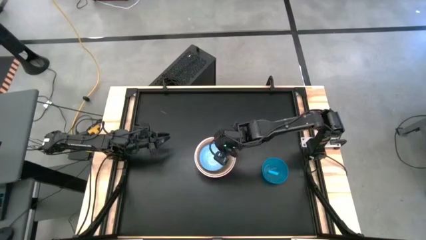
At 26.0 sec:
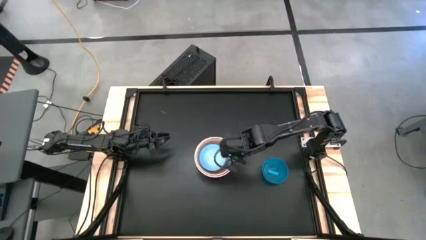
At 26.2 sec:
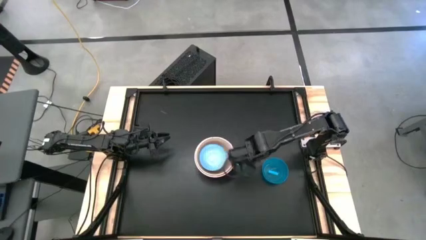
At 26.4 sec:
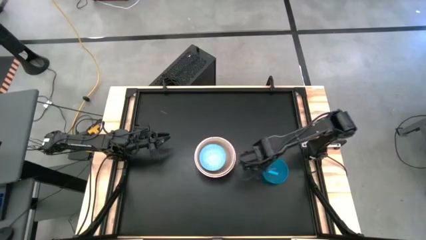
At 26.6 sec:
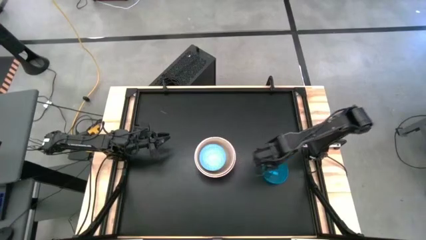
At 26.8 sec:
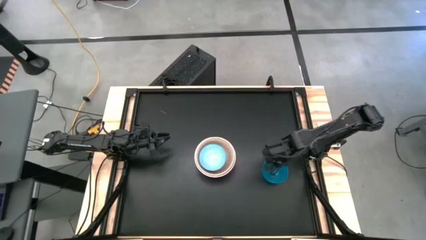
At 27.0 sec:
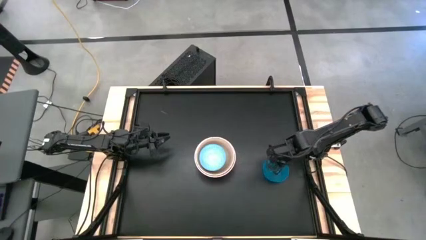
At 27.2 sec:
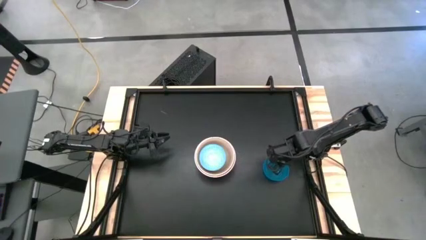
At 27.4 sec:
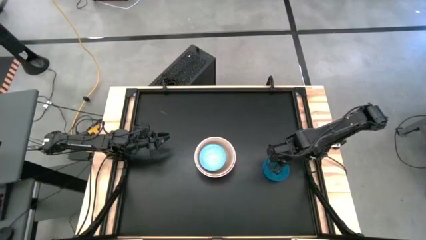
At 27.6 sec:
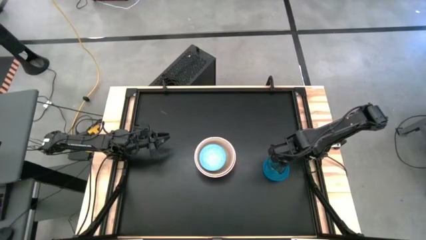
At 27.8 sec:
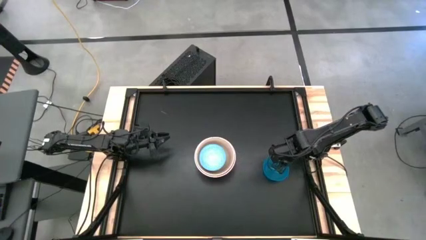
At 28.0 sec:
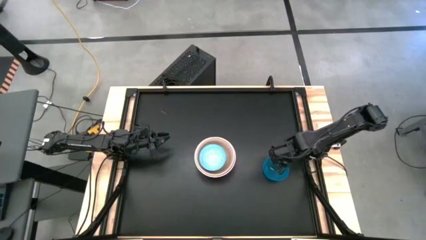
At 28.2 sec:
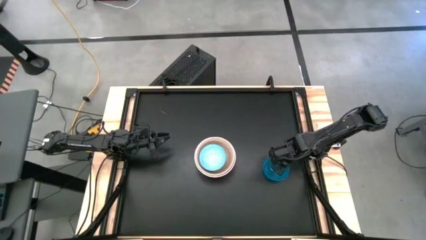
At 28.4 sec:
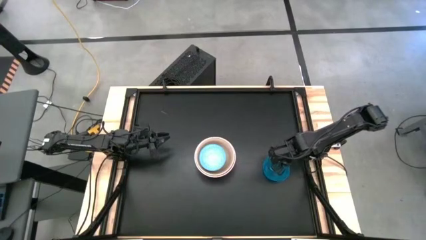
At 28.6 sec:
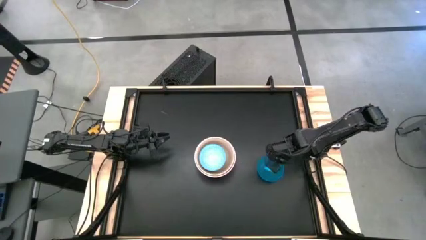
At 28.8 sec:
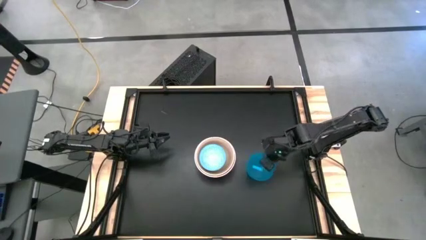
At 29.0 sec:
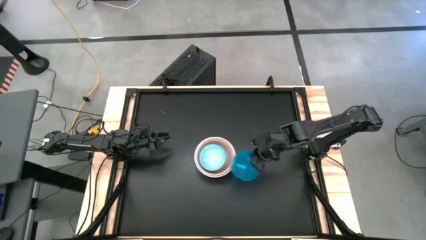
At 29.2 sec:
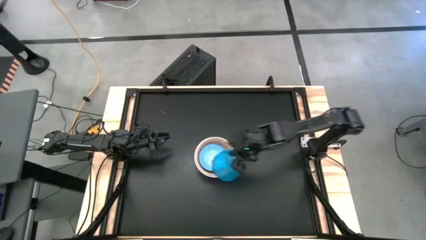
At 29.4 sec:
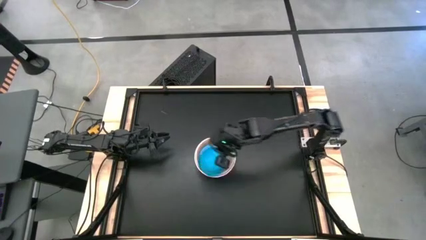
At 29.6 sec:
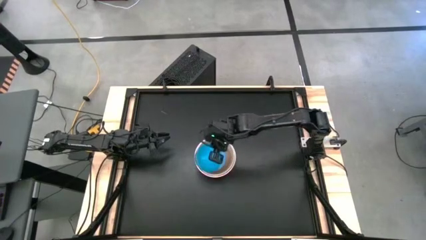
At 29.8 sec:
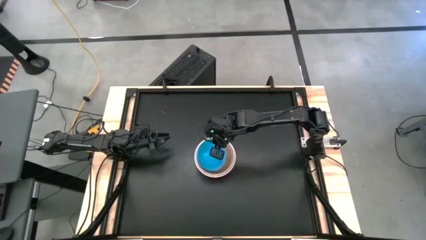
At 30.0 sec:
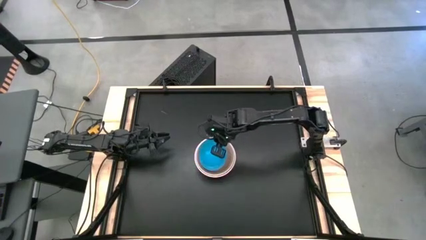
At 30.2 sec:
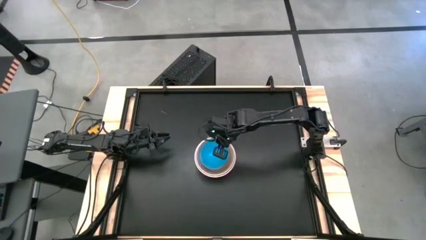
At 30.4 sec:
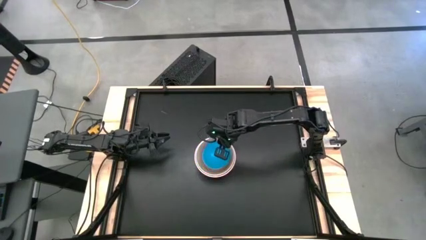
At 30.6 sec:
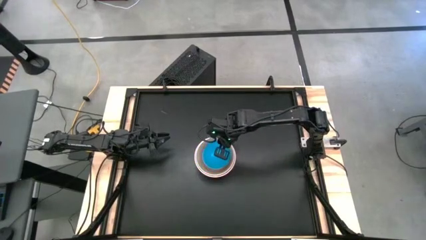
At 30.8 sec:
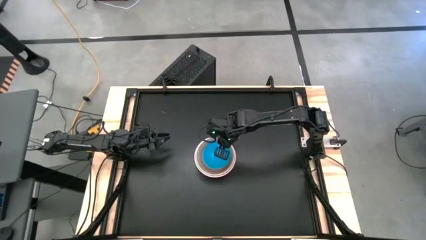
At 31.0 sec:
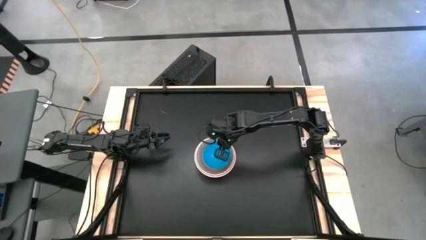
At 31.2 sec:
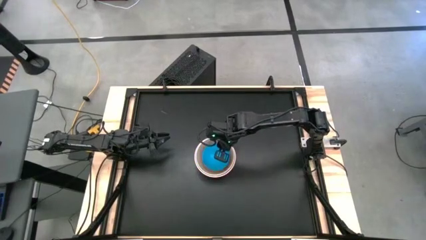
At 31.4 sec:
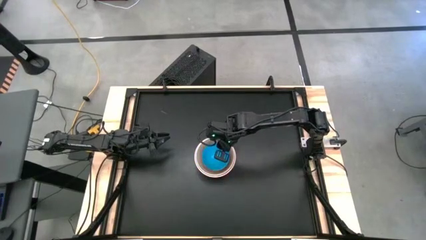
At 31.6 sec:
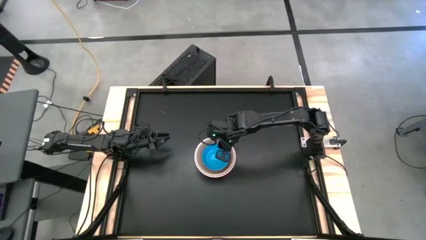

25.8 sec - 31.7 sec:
Stack the transparent blue bowl on top of the blue bowl

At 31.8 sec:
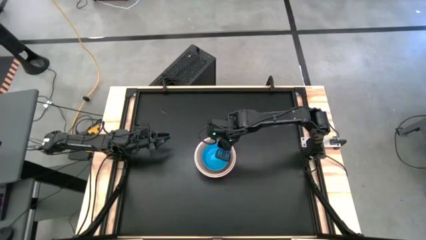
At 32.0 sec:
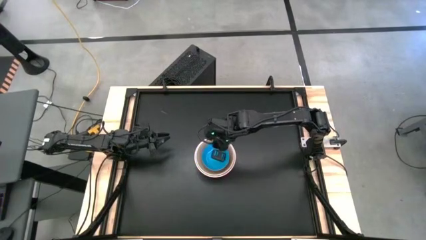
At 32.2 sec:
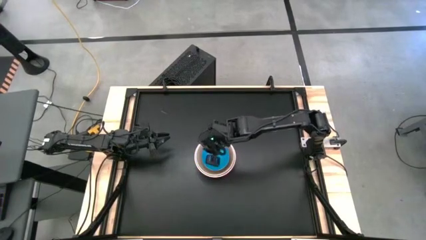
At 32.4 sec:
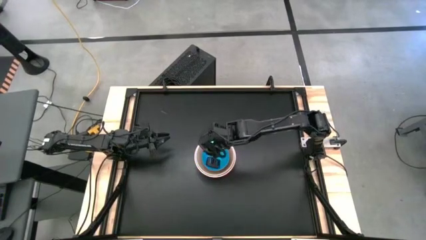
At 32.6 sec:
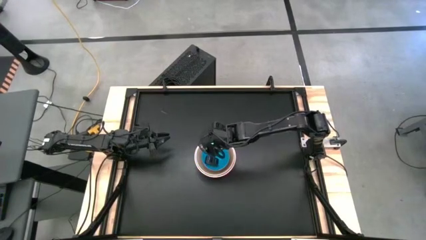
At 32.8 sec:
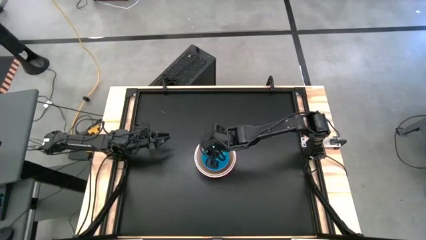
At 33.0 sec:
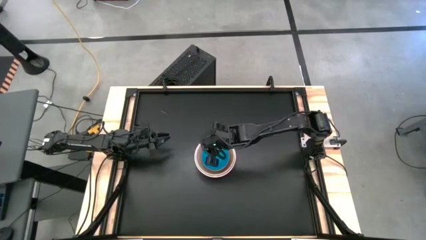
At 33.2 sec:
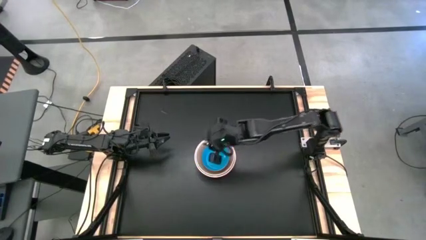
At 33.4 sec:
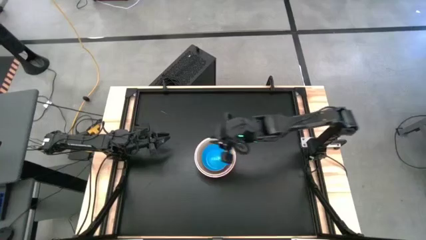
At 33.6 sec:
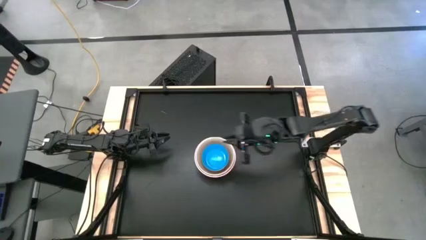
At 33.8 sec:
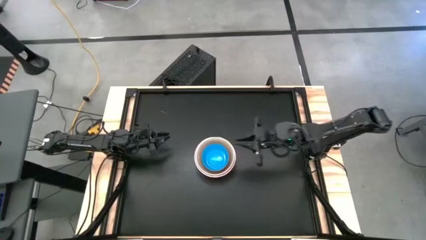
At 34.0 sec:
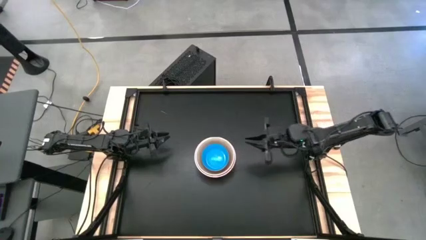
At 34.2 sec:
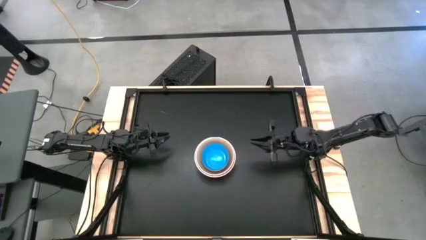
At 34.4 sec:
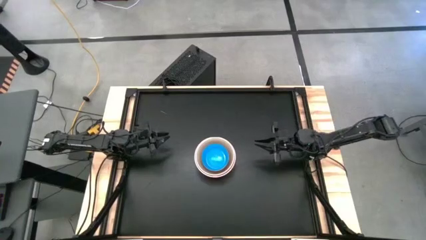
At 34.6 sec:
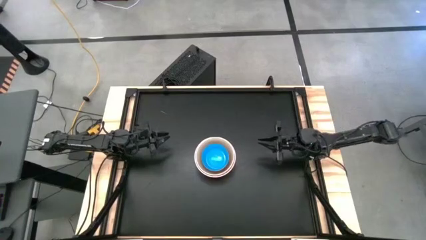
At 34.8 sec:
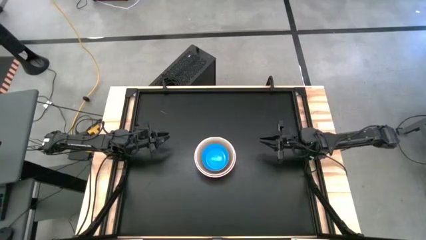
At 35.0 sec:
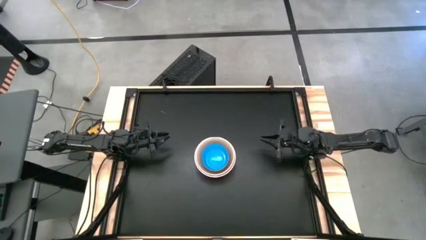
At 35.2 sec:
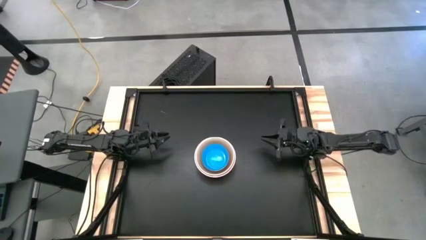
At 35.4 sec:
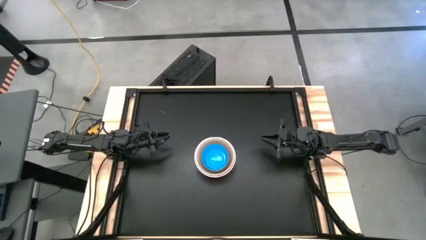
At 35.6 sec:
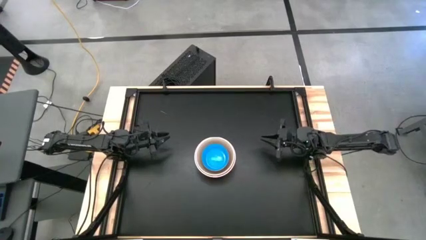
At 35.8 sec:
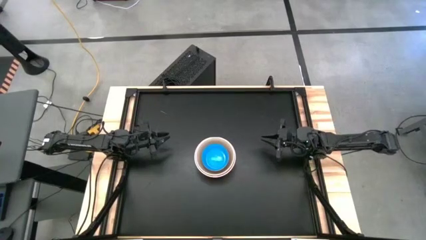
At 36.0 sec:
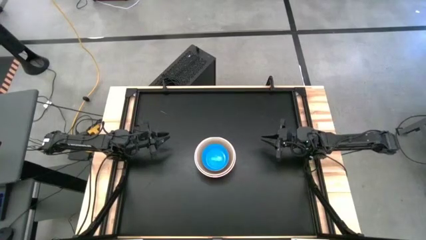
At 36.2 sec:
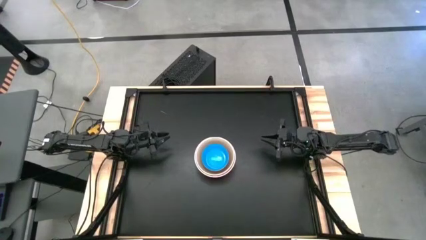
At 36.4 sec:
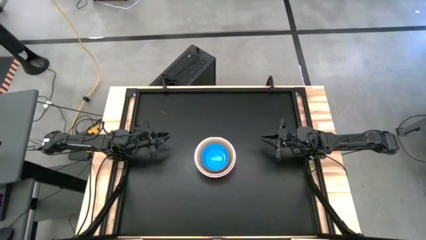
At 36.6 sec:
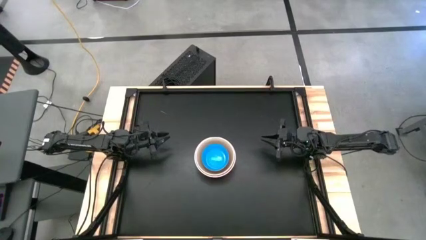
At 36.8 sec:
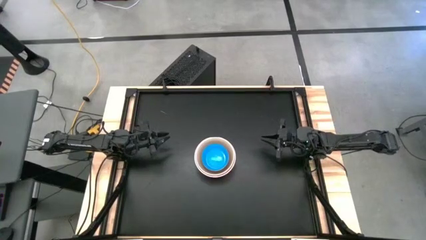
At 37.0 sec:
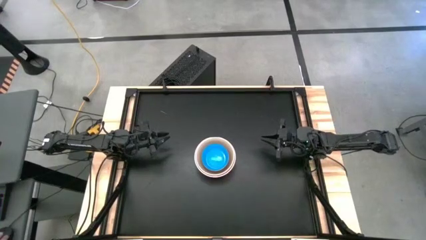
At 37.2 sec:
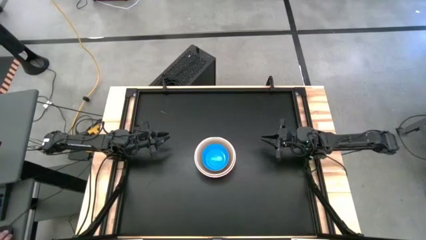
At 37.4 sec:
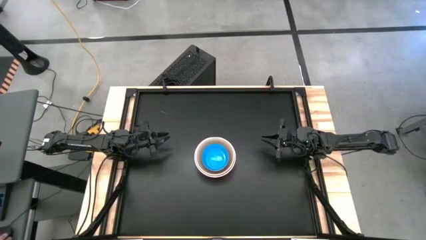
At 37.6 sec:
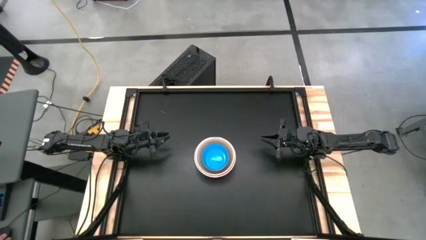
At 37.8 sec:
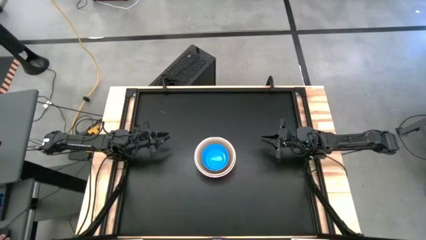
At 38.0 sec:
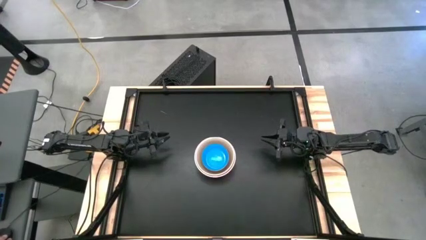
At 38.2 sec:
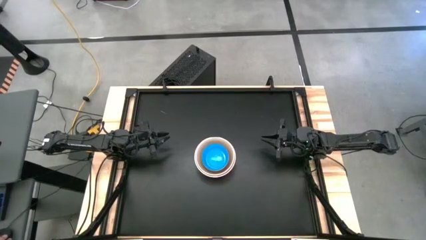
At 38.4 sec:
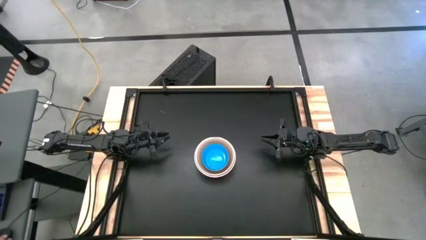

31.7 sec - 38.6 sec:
Return to Home Position
